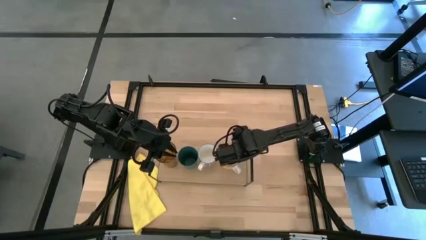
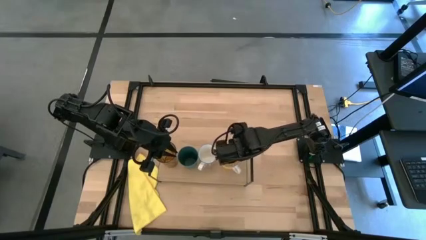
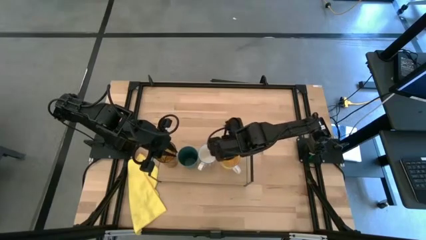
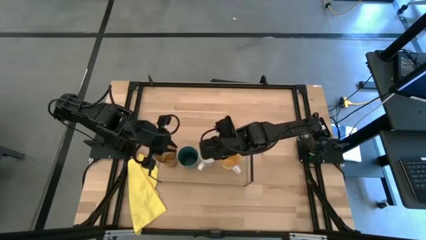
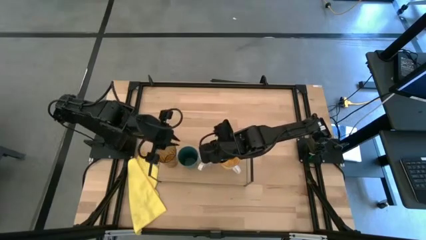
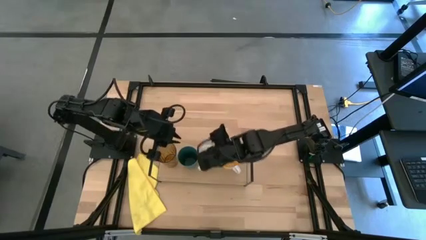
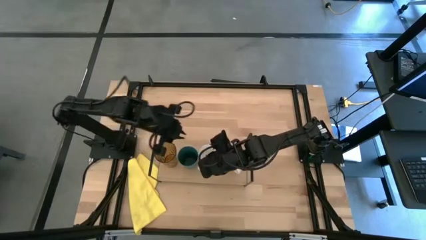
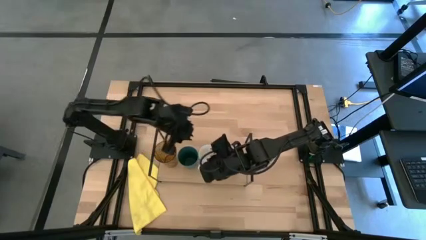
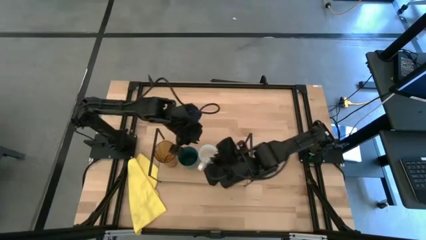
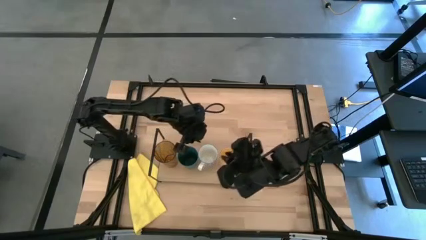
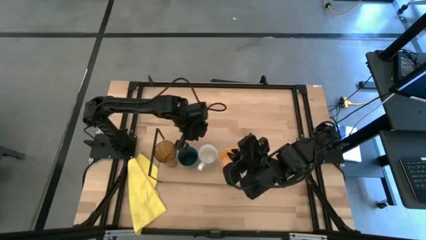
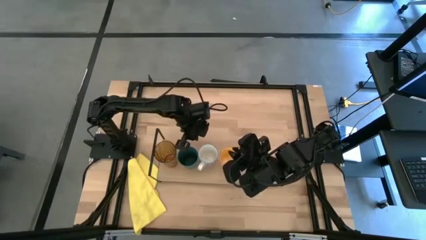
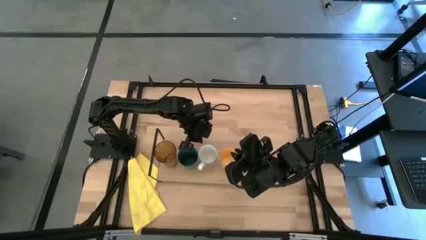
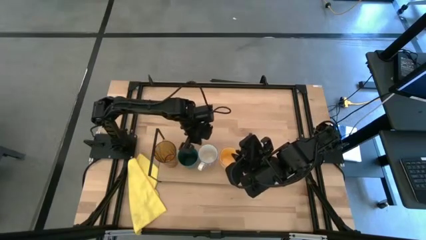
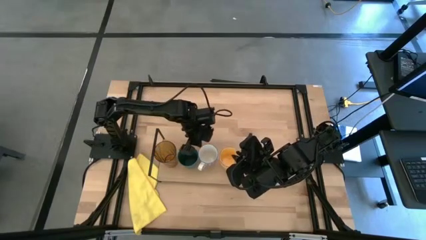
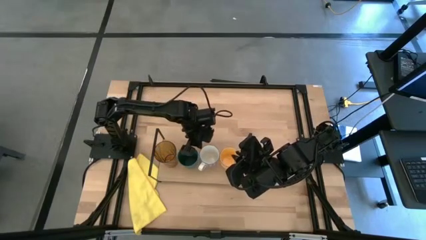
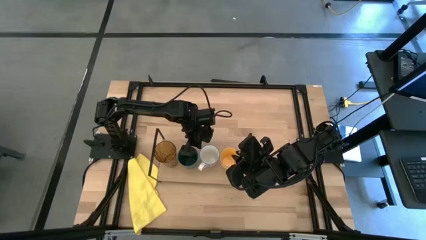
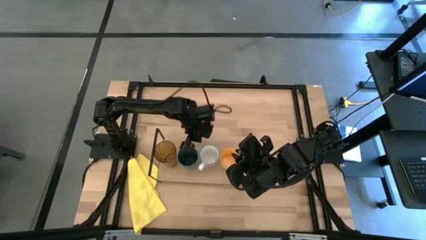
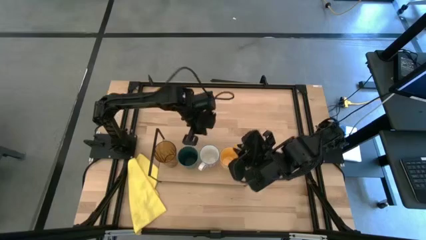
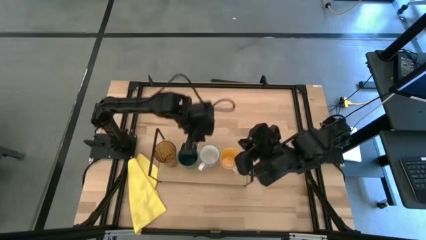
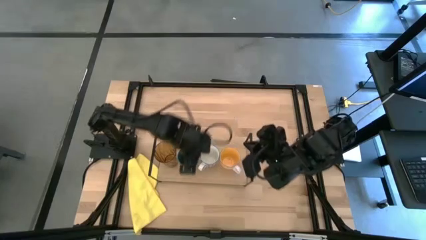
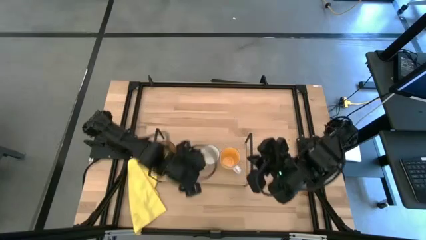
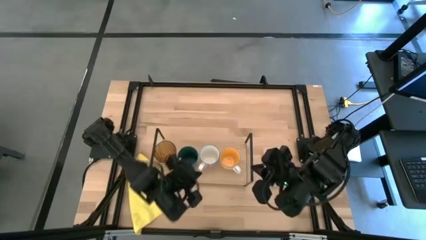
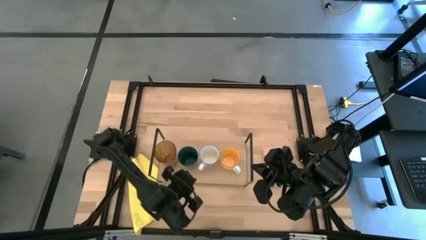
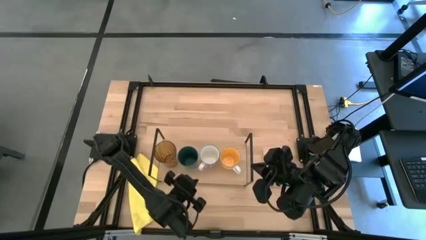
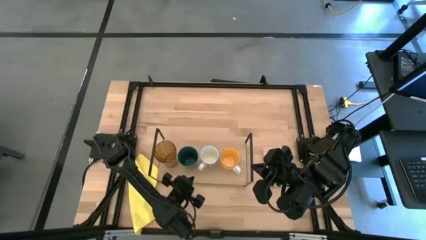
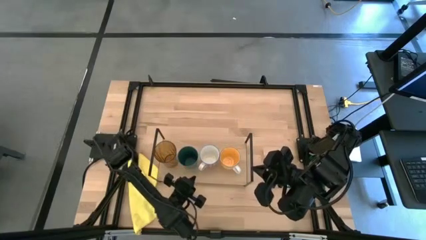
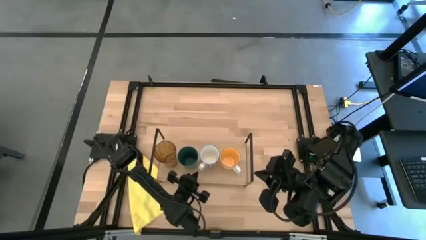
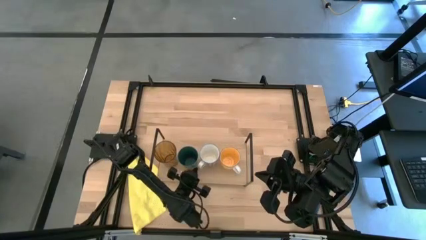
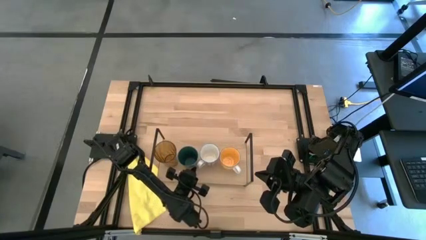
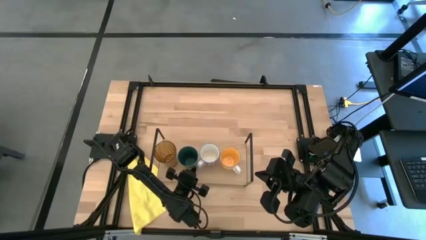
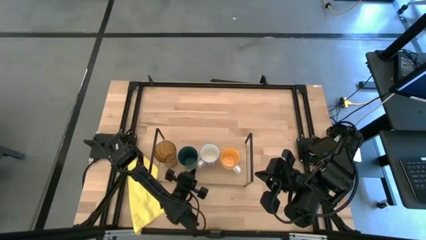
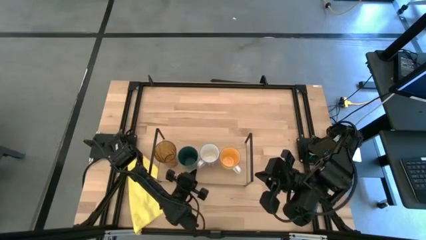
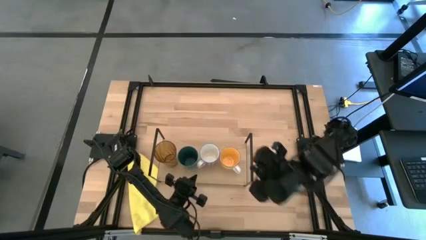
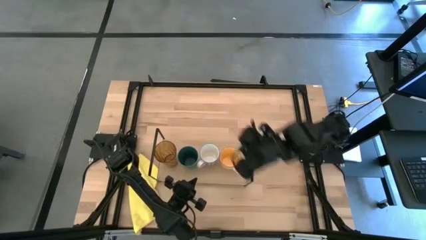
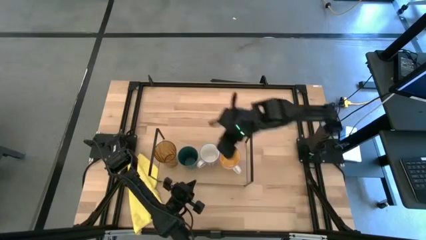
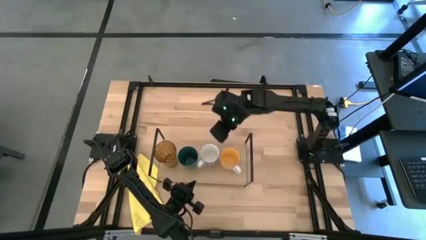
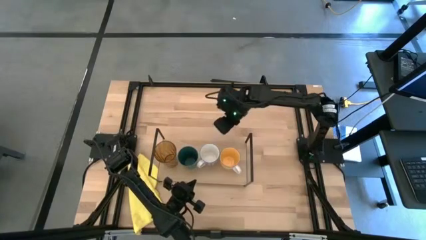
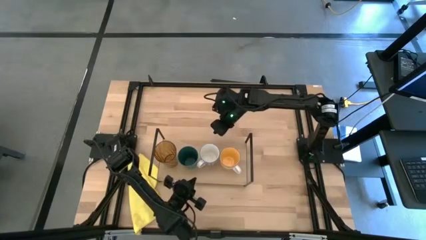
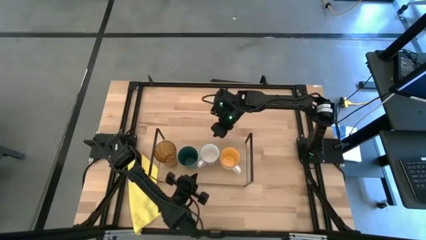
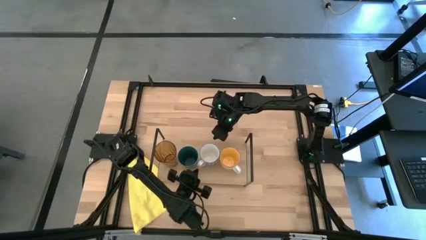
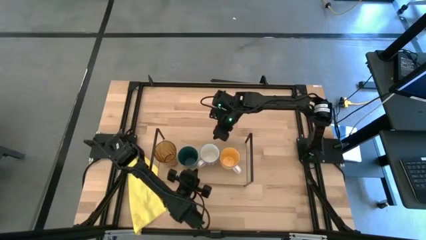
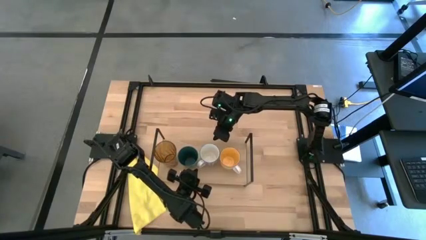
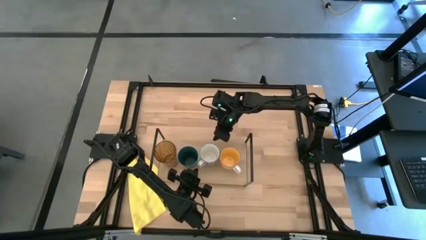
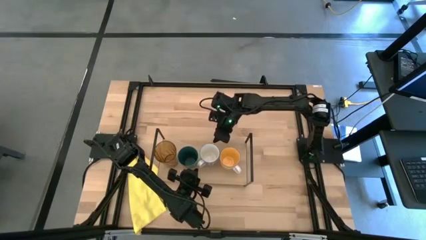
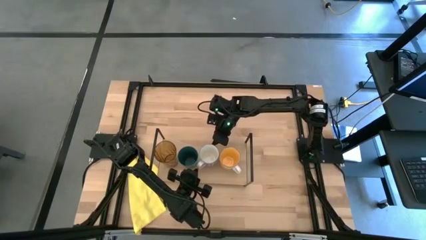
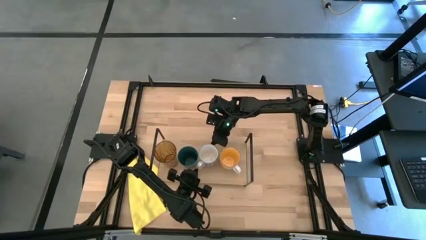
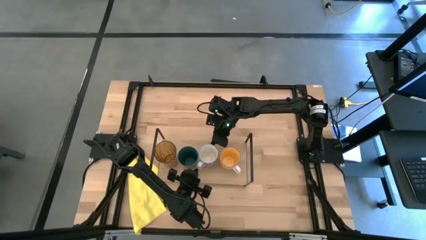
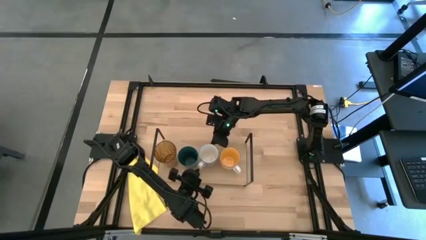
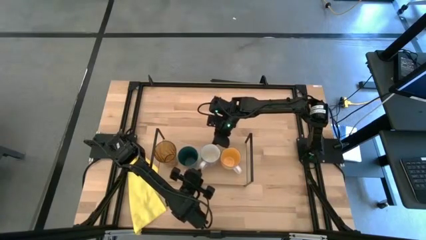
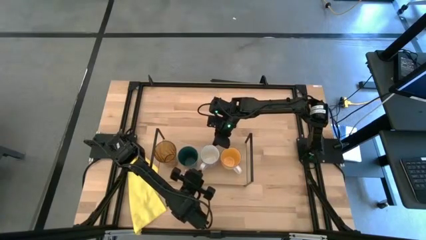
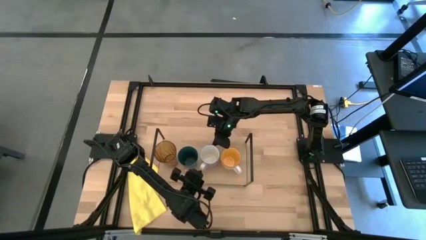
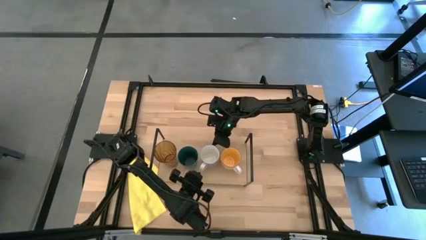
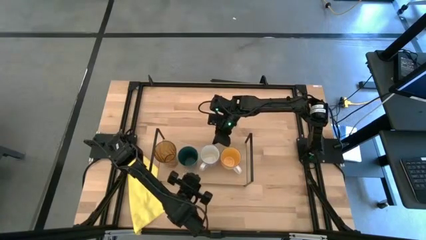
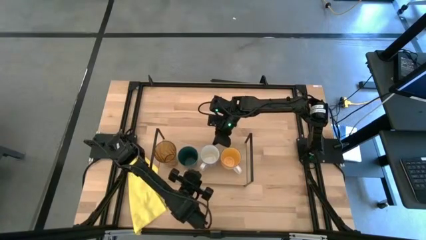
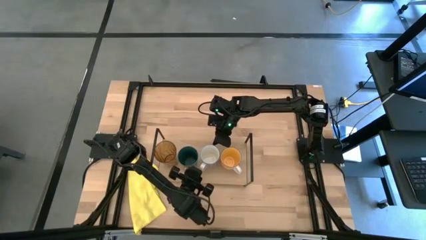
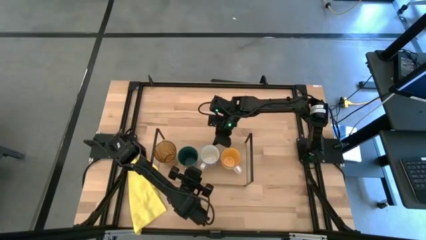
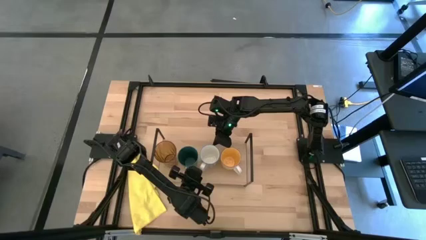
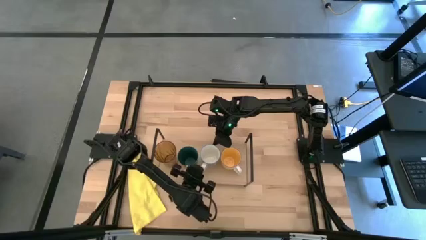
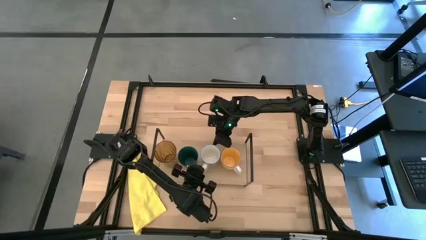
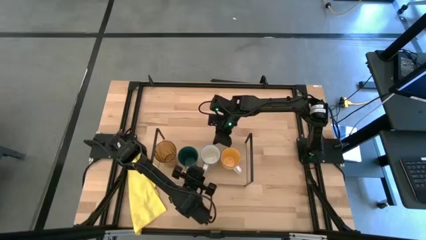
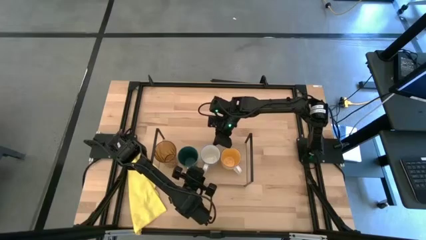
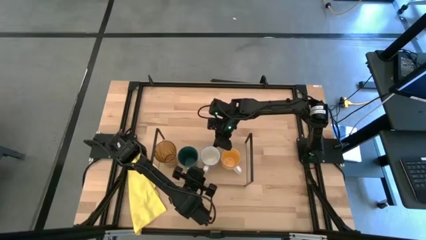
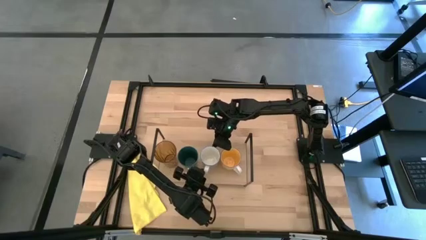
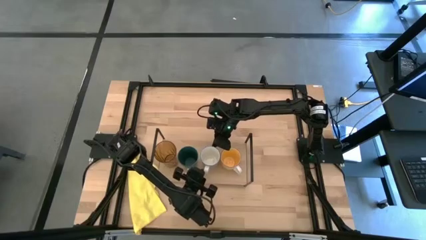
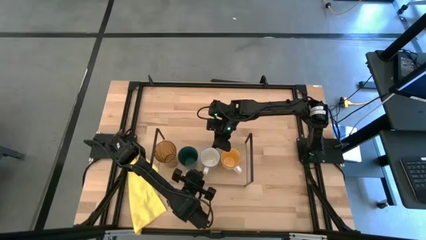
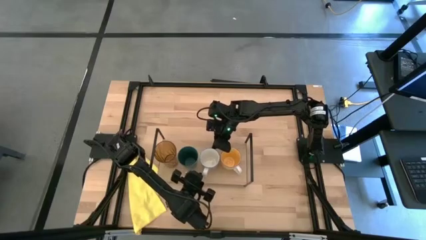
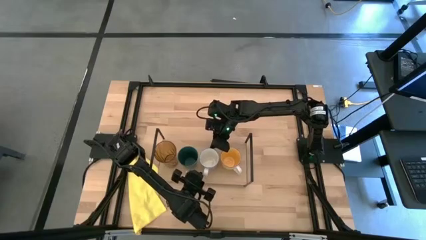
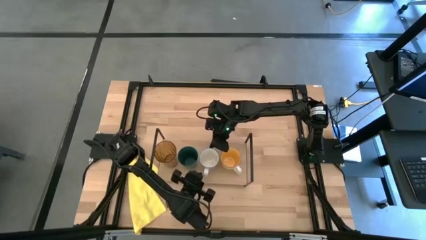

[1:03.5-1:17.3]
Task: Stack small to large cups/mugs on shelf
Adjust the red mug on the shelf
